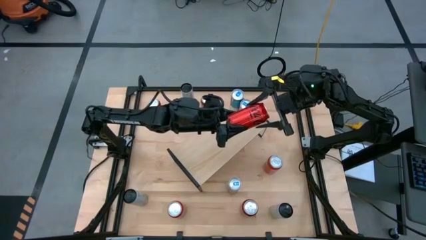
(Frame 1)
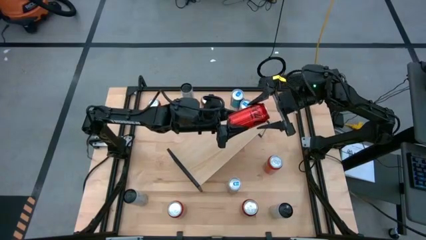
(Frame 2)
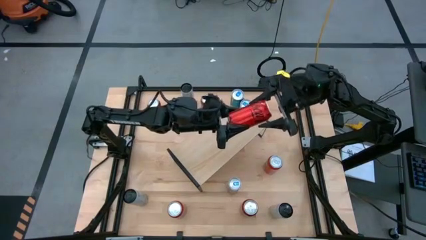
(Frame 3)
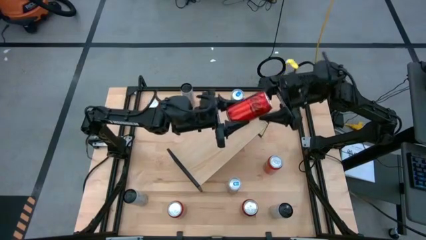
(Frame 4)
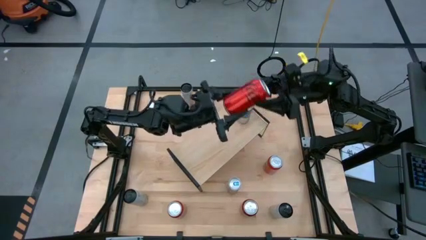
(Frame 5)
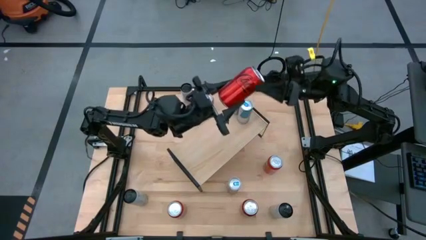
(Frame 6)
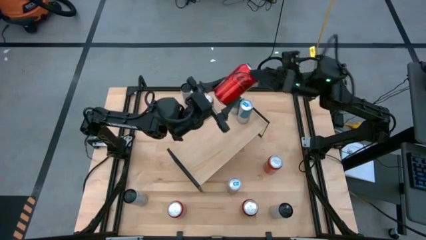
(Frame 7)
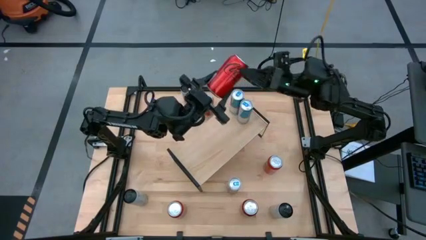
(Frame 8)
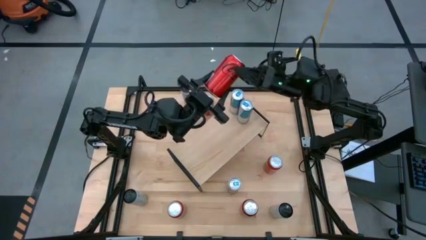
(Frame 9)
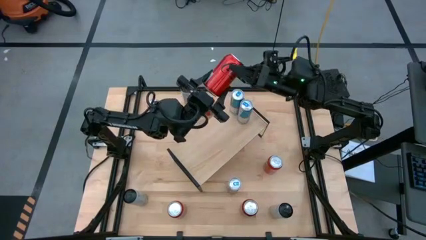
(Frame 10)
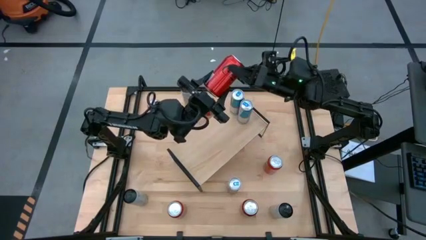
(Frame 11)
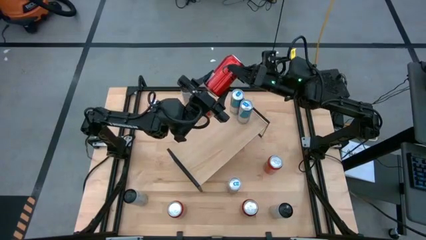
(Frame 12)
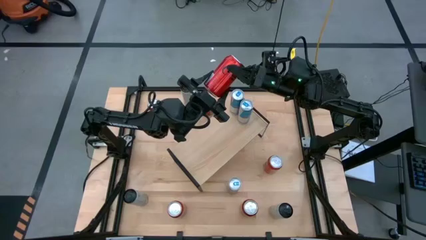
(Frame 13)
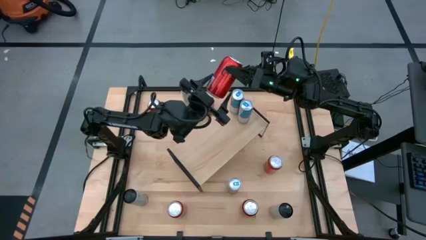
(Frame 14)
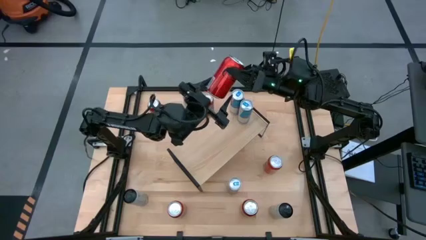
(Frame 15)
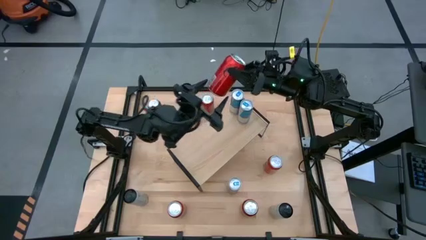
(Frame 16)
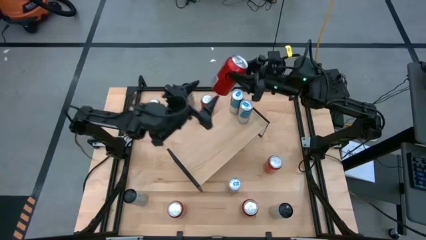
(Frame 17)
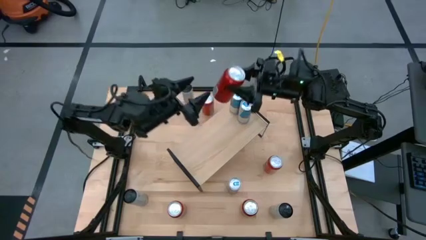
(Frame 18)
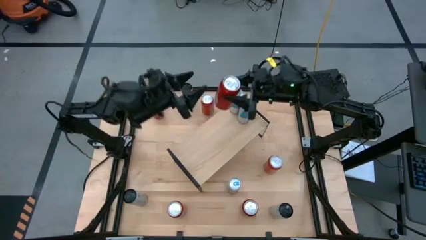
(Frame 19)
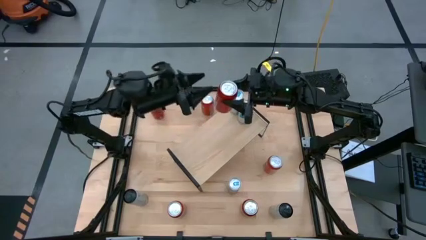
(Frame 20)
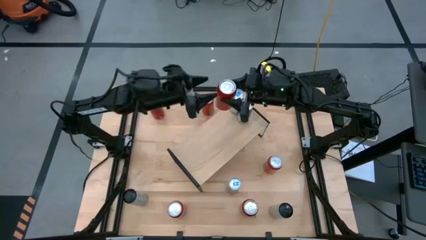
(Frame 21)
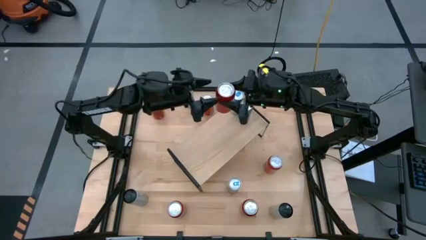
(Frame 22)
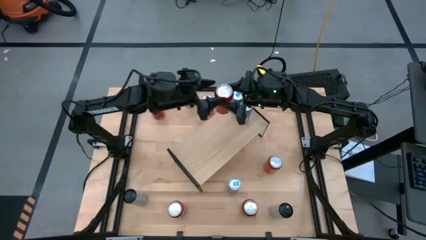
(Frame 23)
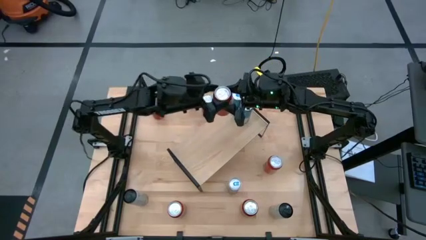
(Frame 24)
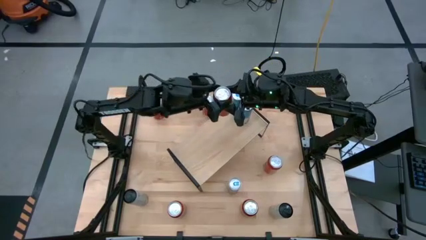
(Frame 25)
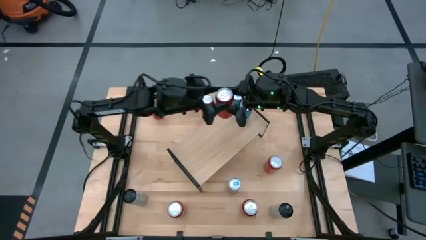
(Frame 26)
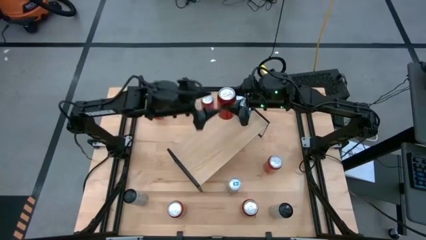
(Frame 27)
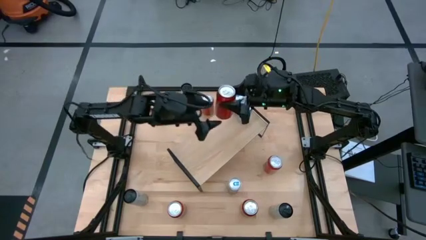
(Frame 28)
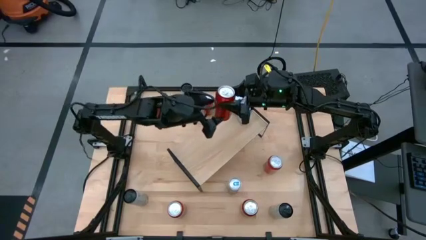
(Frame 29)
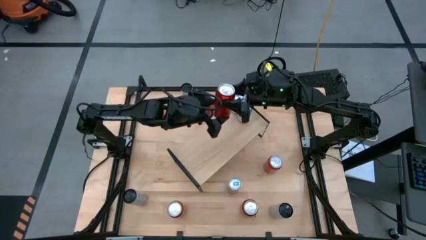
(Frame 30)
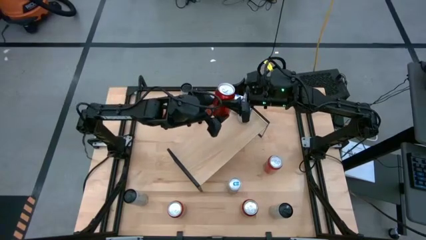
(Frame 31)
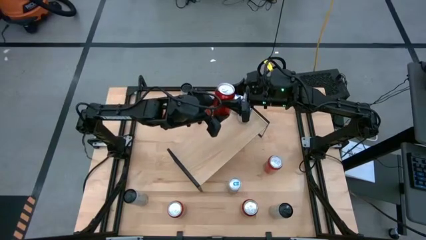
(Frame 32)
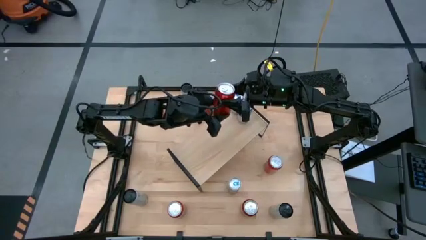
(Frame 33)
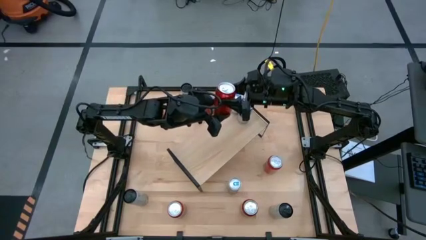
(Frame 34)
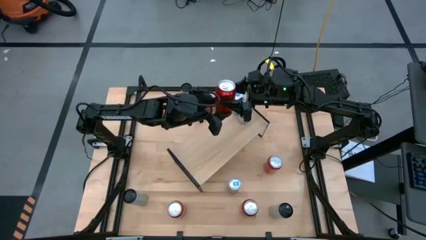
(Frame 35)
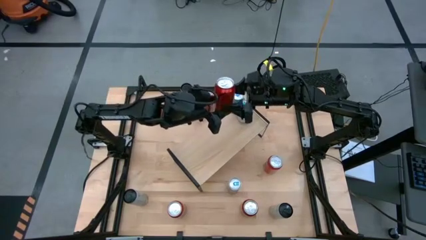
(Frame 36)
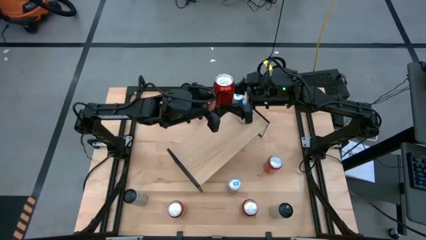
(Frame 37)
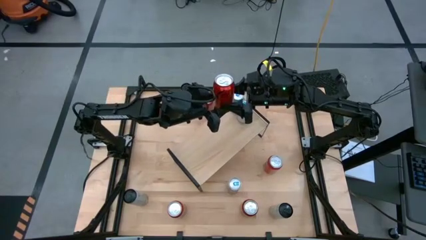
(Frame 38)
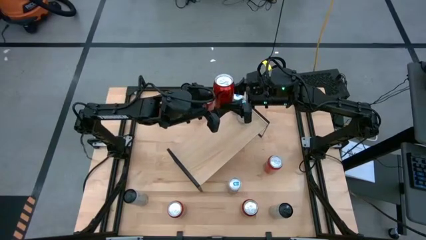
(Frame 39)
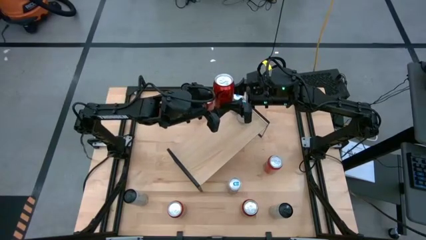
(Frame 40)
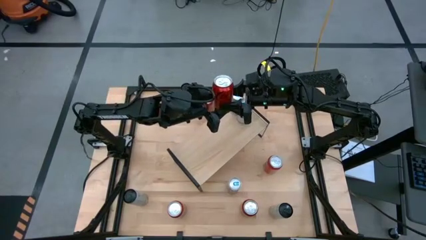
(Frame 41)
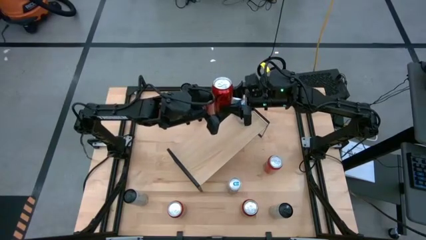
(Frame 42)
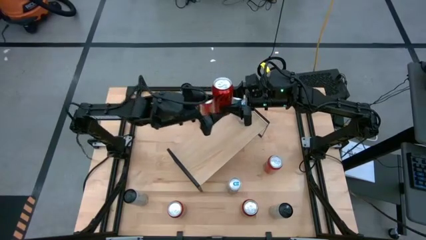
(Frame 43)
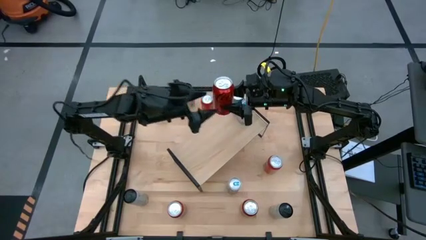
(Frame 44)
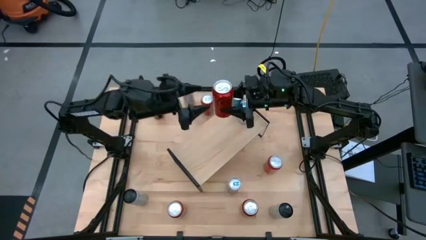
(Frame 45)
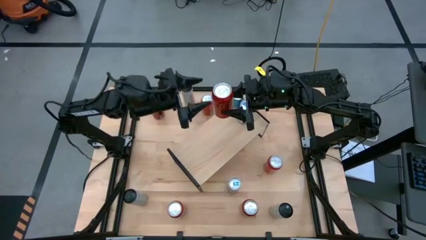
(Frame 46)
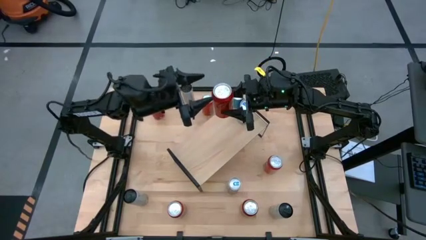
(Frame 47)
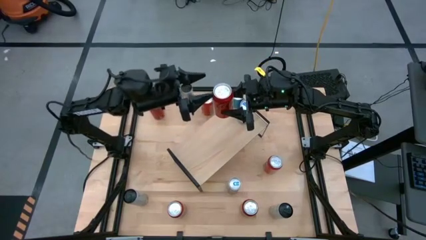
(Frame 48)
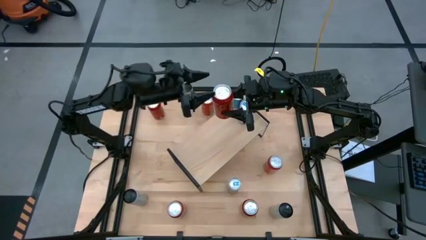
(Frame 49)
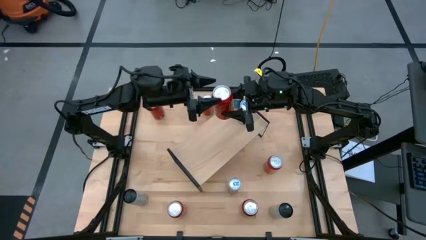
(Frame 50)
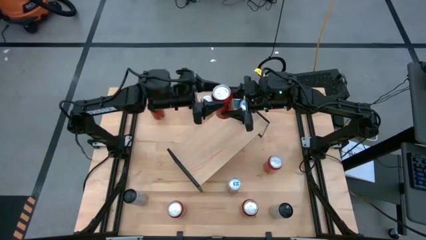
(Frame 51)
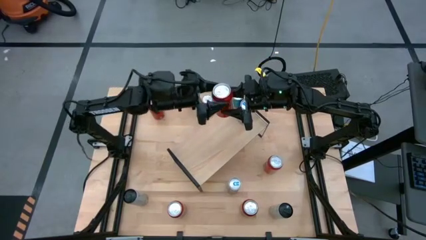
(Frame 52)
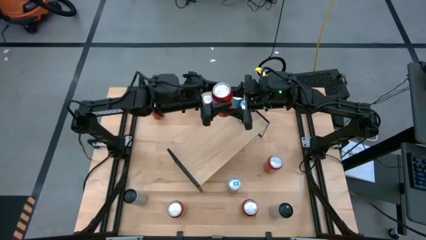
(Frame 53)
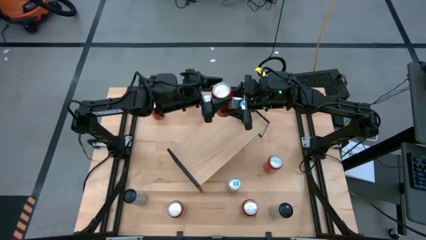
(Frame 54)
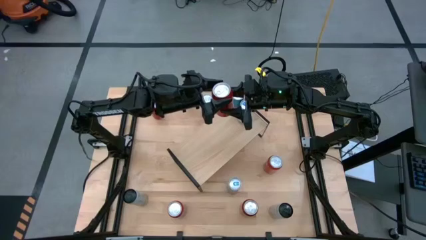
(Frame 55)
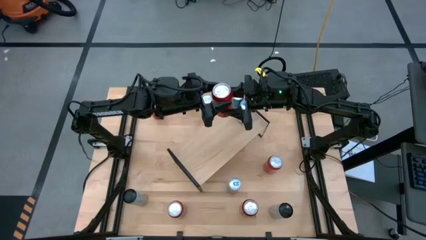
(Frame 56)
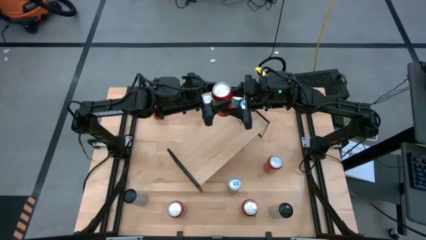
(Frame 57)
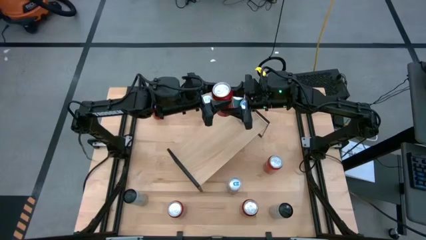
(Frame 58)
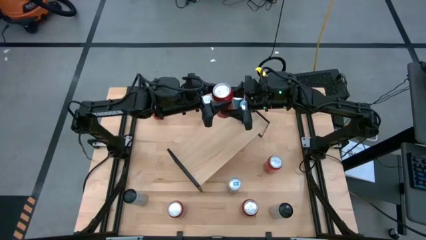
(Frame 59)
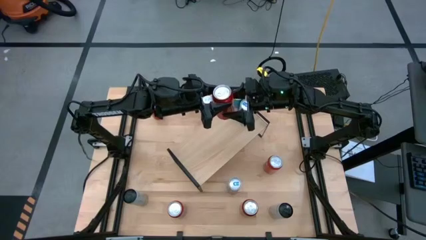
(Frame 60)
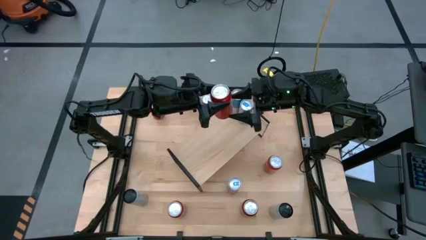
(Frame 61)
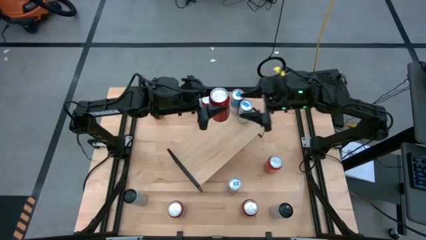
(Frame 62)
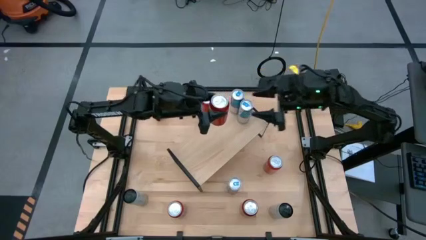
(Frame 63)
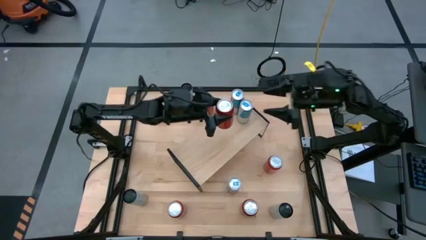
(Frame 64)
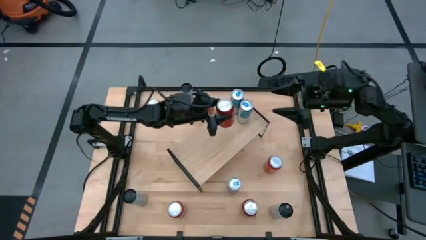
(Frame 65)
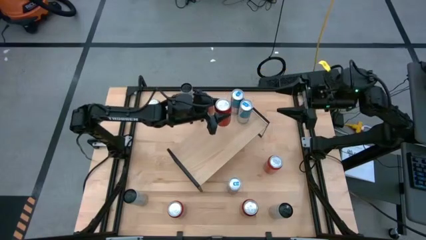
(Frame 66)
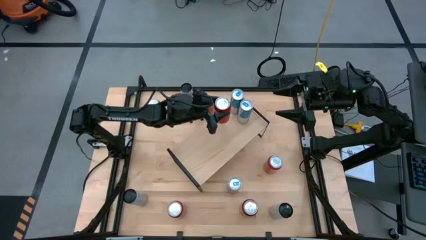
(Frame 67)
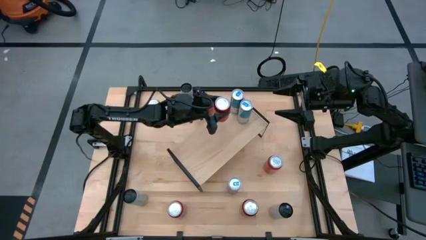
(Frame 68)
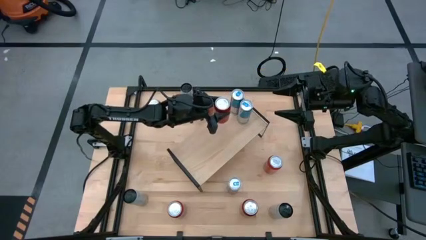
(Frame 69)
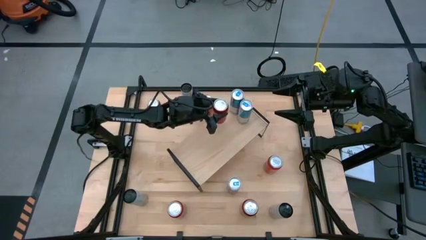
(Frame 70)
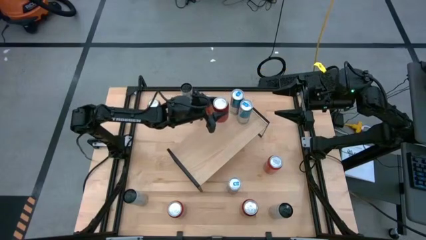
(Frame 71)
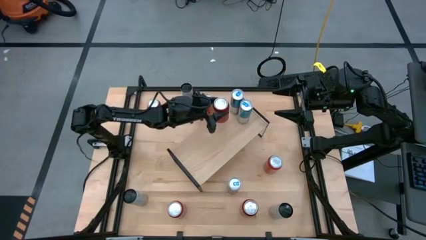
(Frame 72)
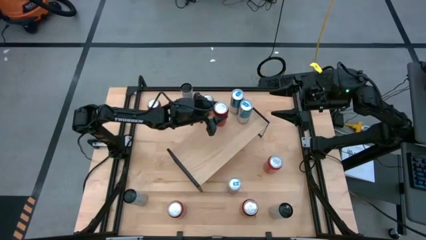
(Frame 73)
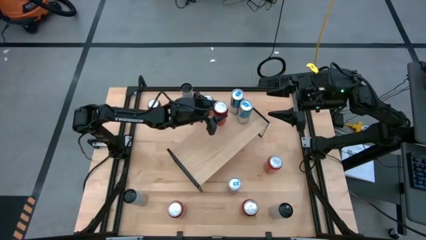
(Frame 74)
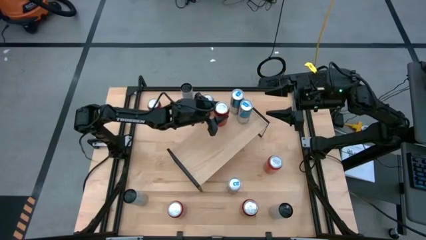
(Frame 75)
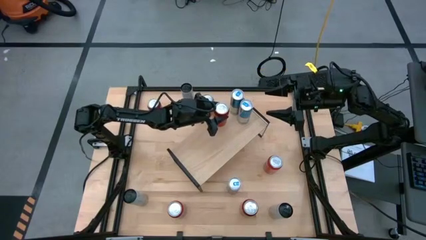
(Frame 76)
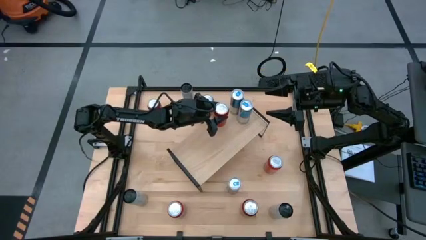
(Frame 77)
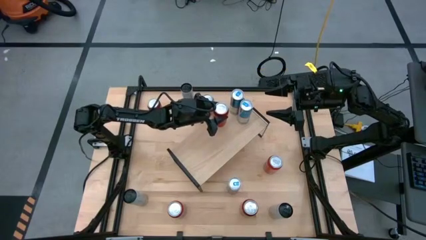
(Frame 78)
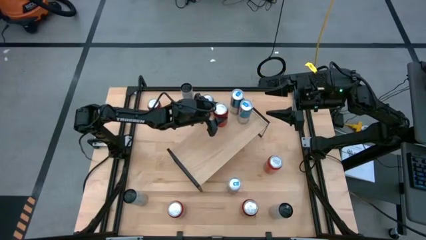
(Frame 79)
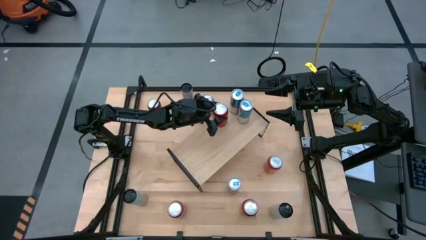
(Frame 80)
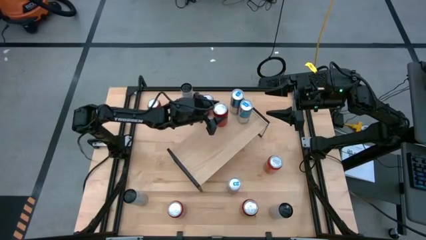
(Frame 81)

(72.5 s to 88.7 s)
Task: Place canned beverage on shelf
Put the top right red soda can on the shelf
